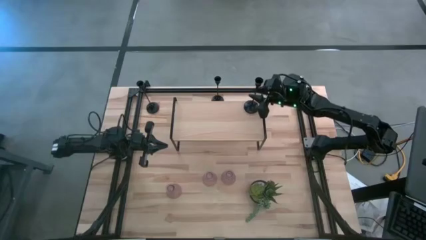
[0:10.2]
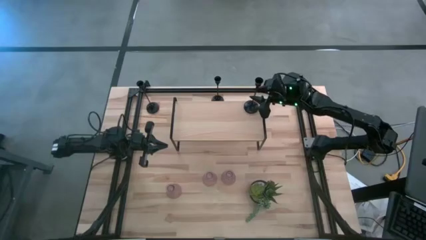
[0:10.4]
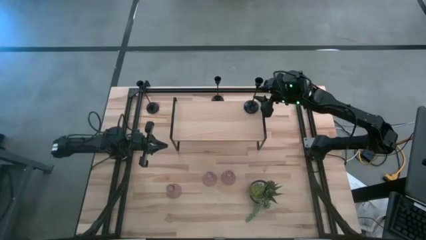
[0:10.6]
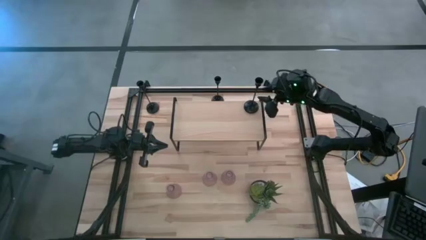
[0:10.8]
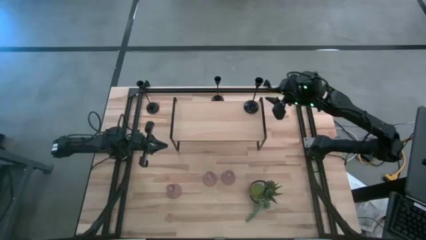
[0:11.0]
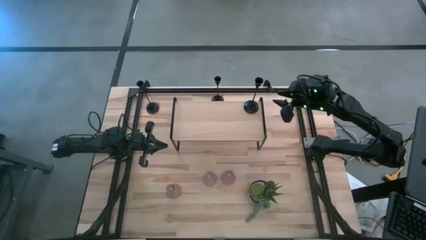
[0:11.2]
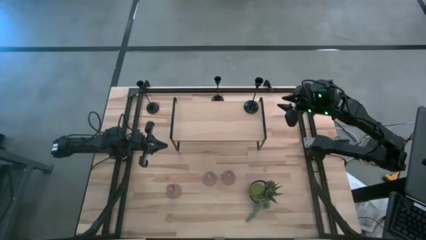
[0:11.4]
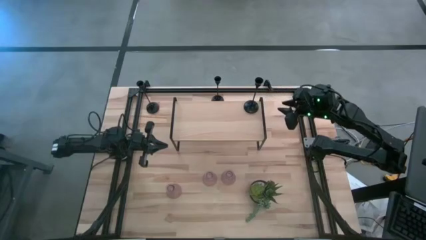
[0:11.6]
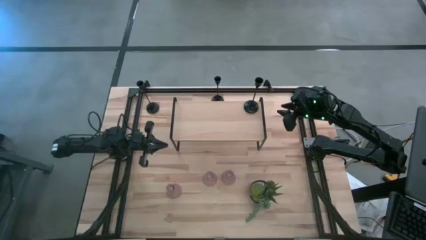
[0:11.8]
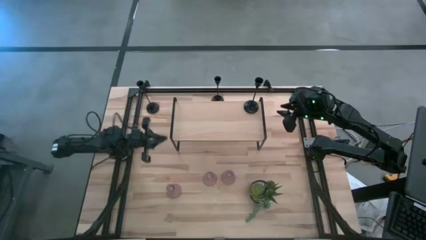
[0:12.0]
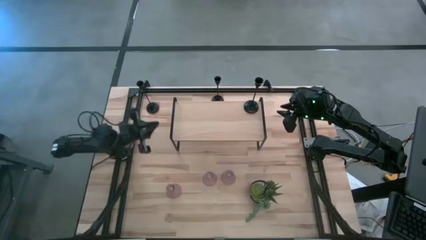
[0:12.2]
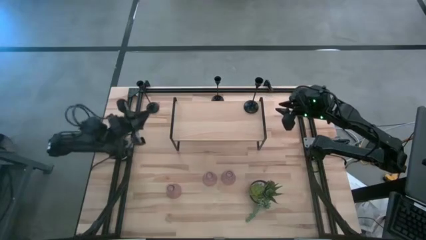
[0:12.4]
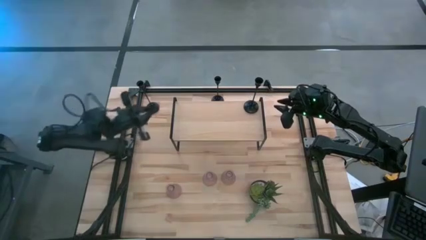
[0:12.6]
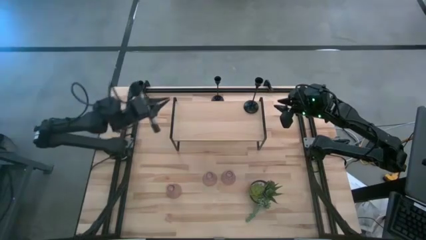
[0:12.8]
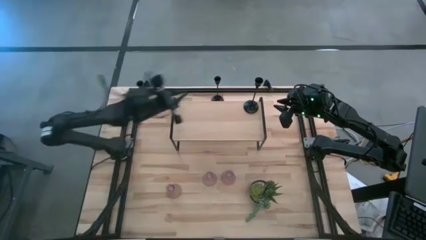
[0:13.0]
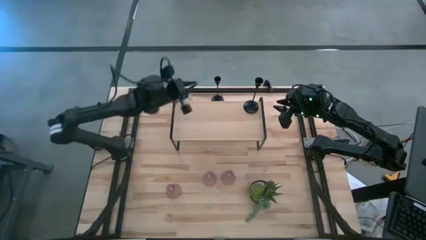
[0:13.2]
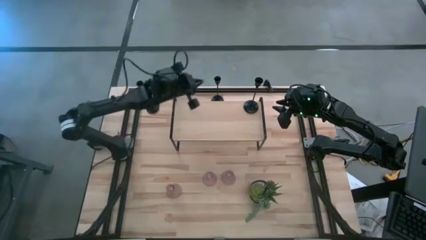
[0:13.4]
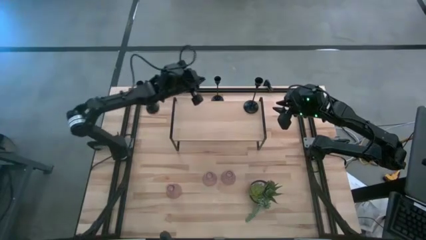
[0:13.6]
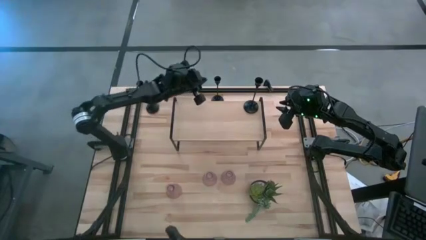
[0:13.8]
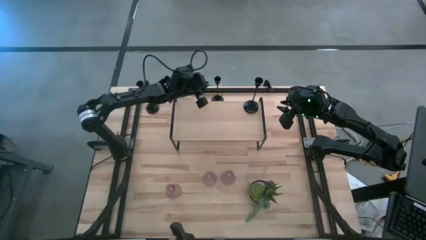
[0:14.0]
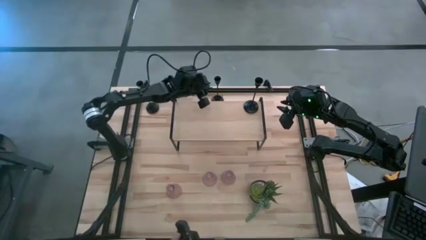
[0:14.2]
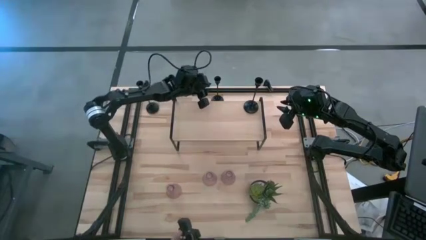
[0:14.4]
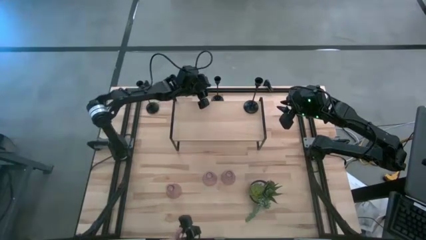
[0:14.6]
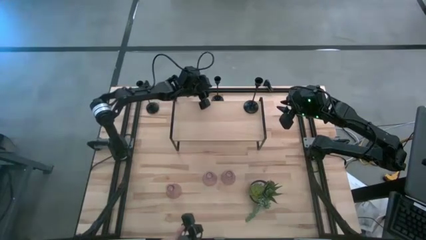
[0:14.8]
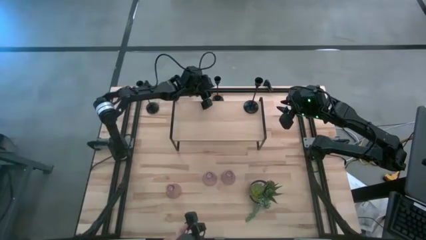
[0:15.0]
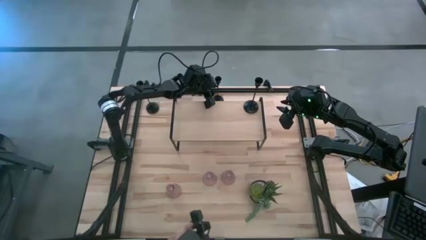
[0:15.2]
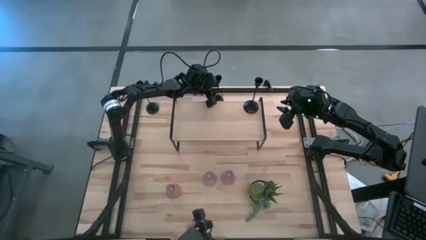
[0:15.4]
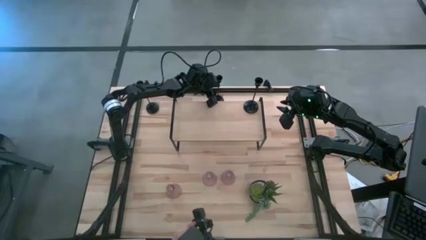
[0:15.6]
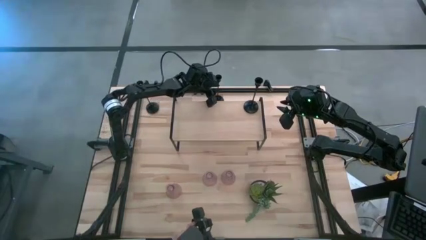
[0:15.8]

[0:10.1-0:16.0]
Task: Pick & Place candle stick holders
Put the right black candle holder on the shelf

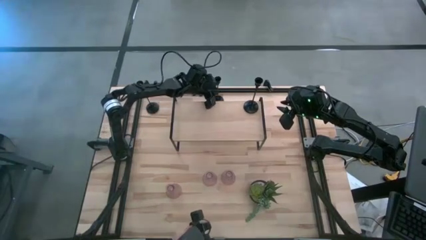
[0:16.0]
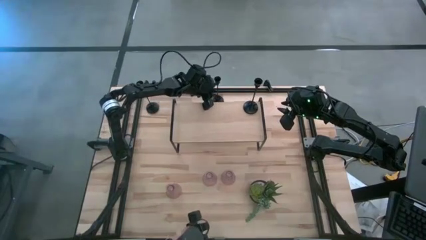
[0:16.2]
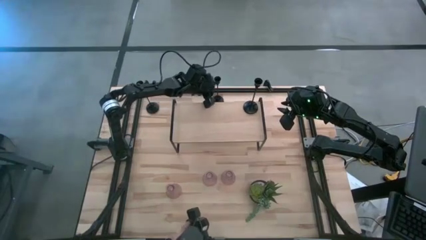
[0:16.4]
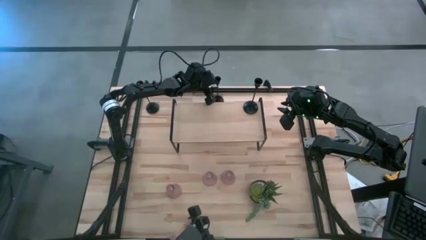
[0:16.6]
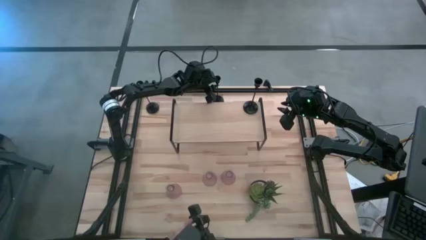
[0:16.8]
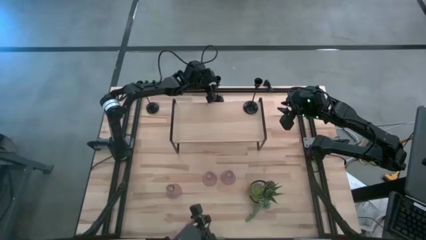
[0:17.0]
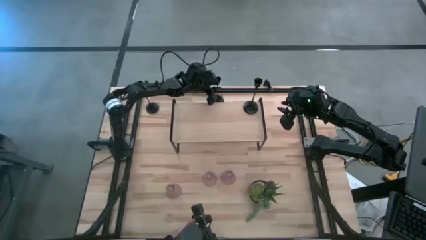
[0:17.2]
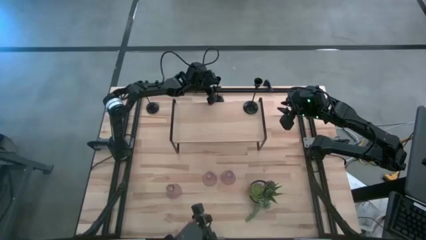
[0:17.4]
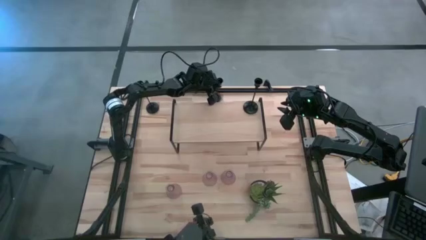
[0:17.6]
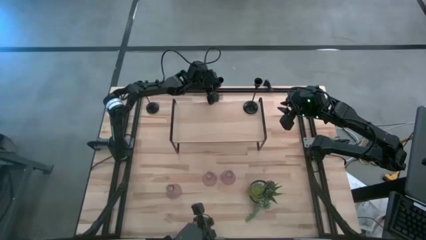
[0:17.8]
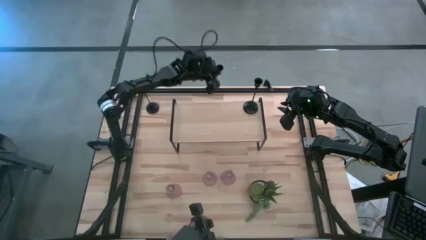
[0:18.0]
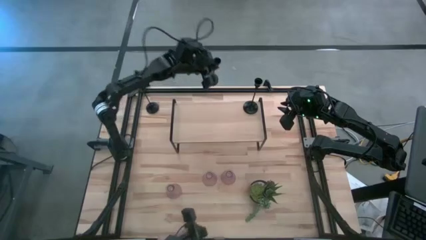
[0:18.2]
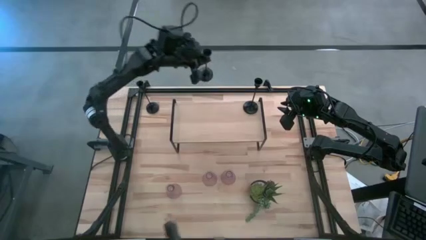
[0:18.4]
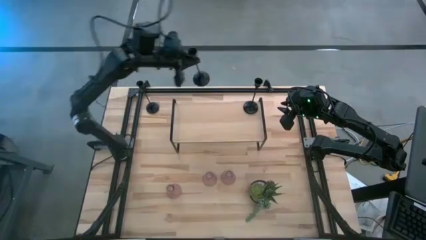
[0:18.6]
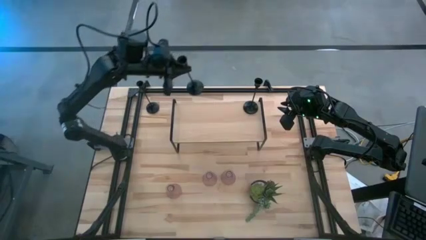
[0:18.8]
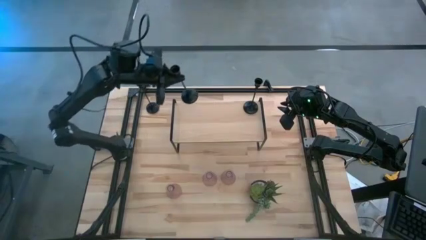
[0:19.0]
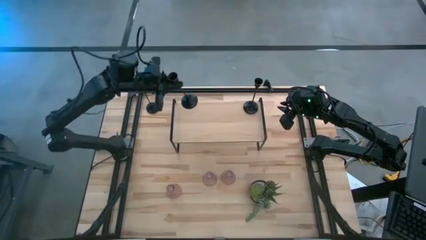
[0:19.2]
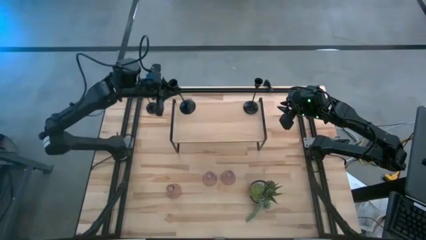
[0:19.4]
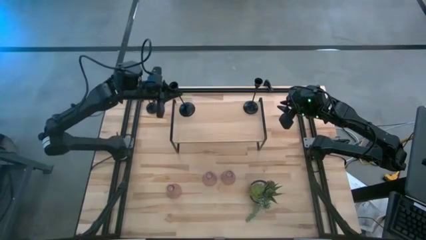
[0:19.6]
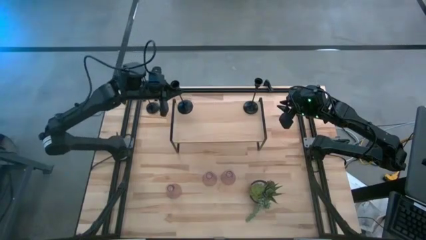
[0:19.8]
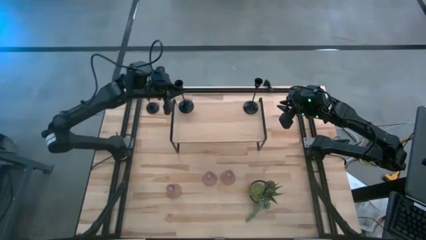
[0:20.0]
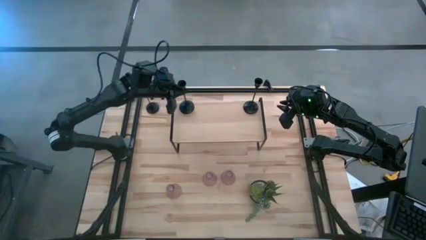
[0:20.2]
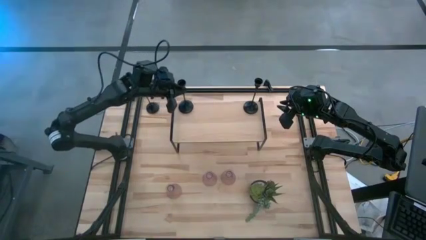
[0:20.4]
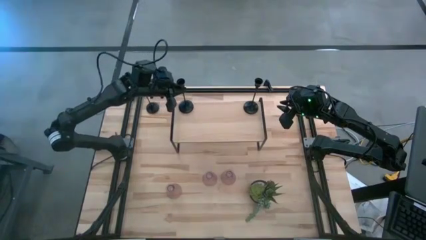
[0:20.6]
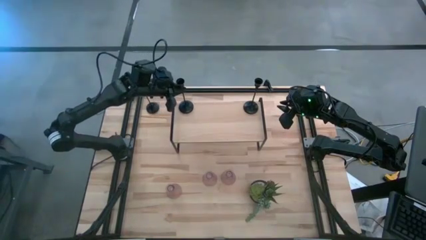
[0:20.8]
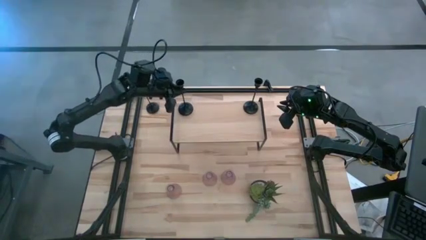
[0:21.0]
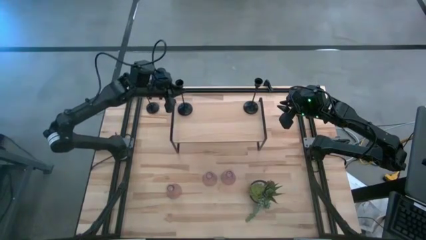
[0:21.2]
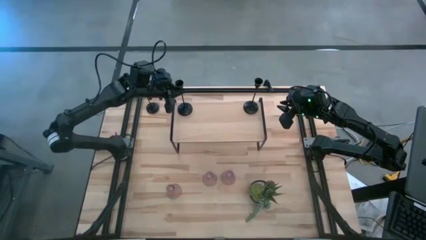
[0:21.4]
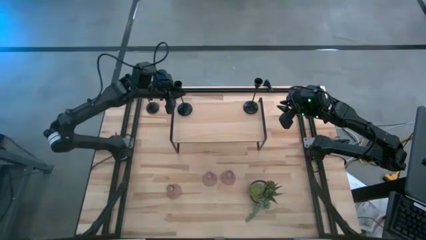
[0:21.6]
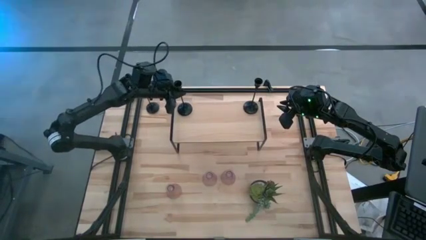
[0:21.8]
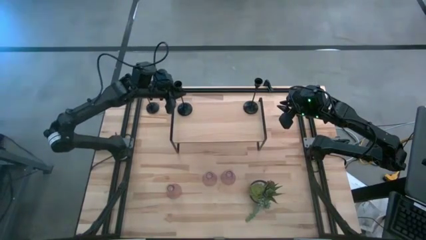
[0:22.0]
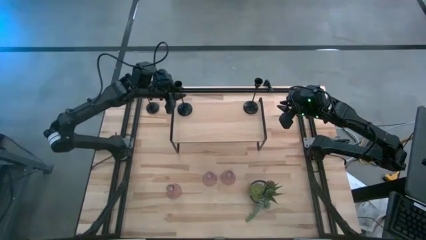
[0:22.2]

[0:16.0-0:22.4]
Put the right black candle holder on the shelf

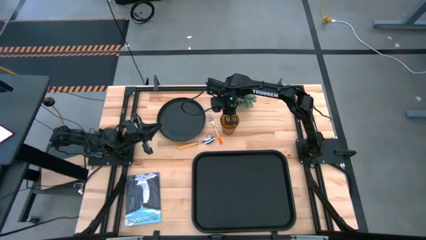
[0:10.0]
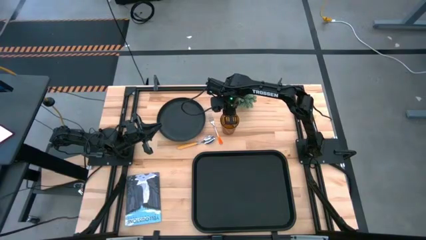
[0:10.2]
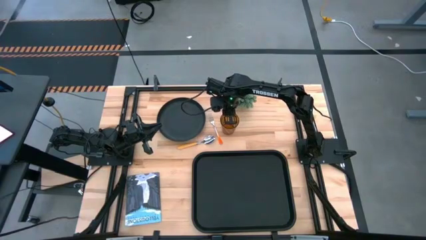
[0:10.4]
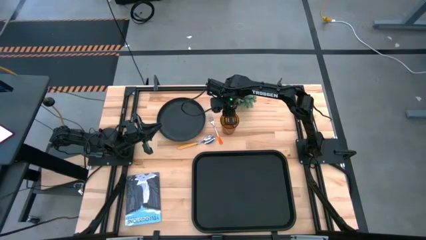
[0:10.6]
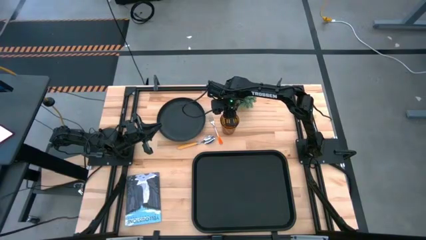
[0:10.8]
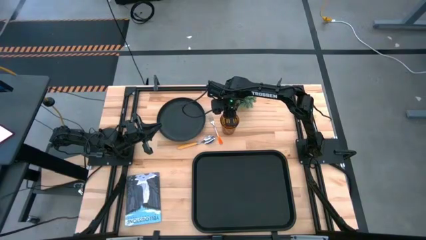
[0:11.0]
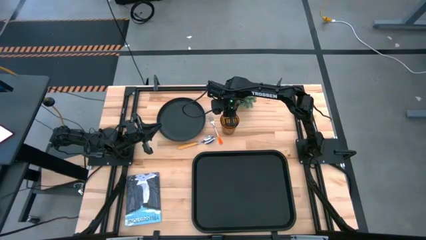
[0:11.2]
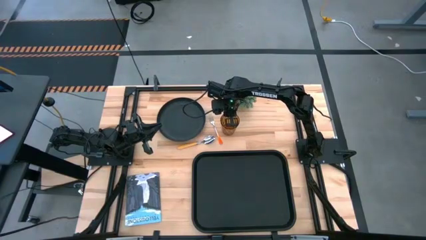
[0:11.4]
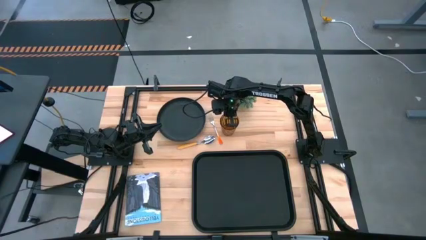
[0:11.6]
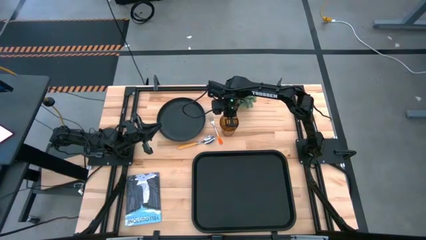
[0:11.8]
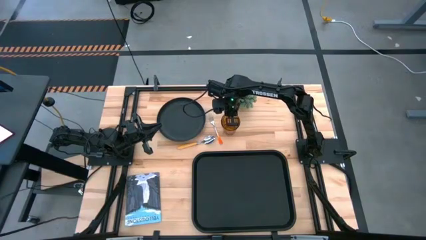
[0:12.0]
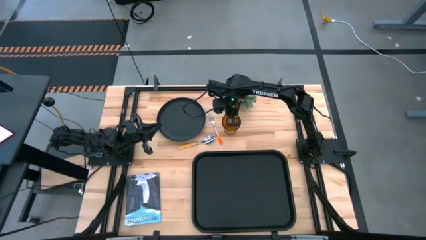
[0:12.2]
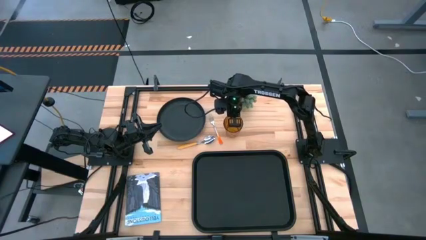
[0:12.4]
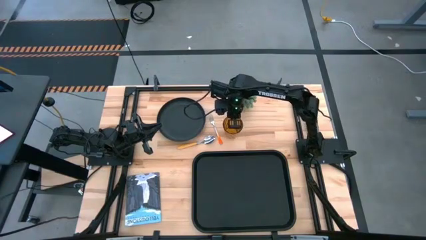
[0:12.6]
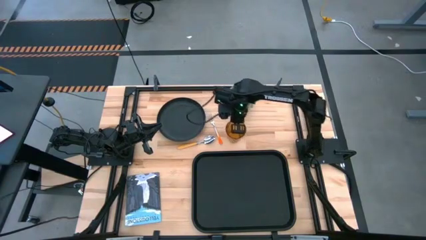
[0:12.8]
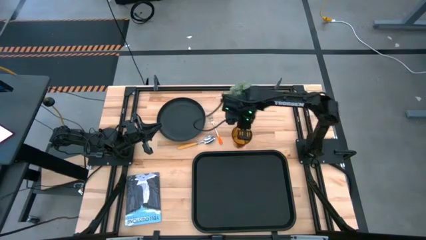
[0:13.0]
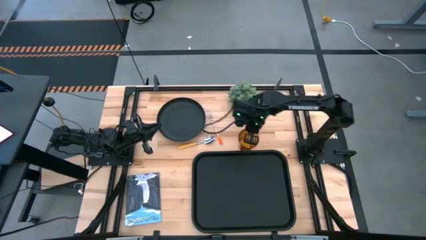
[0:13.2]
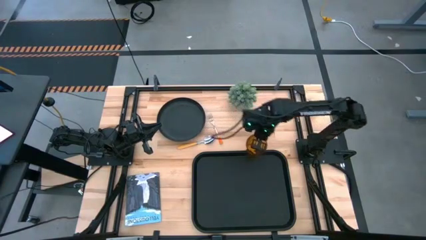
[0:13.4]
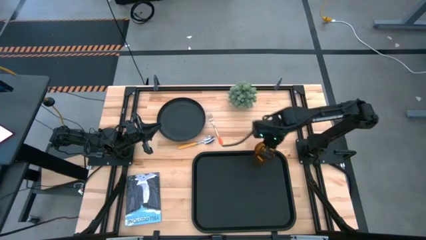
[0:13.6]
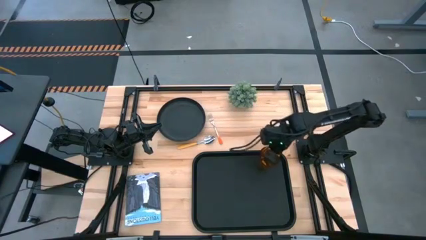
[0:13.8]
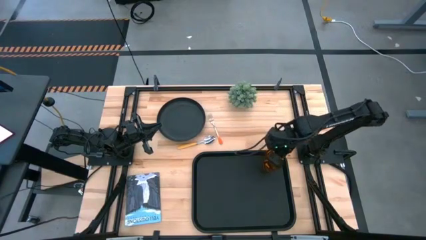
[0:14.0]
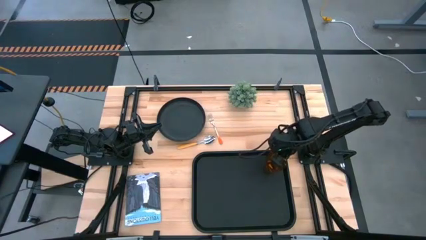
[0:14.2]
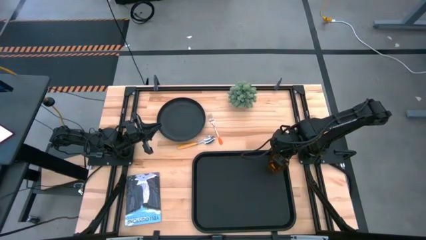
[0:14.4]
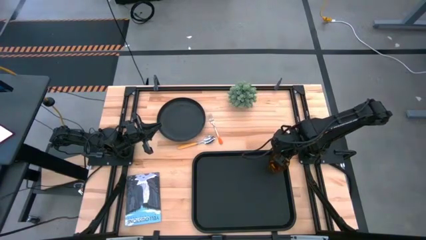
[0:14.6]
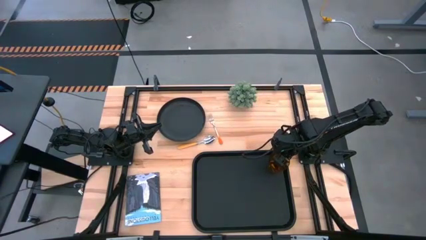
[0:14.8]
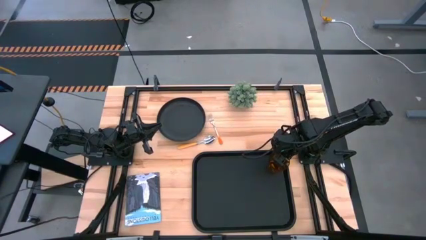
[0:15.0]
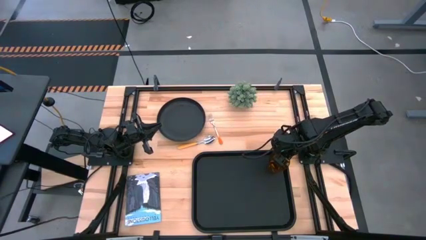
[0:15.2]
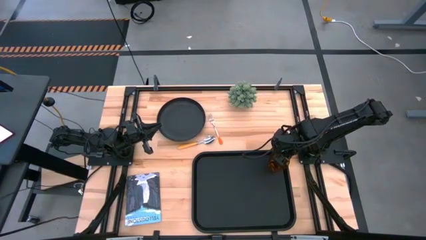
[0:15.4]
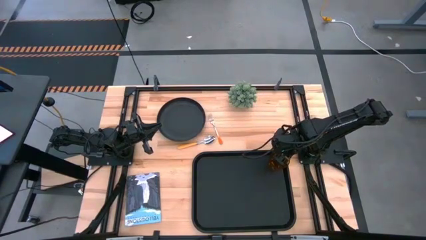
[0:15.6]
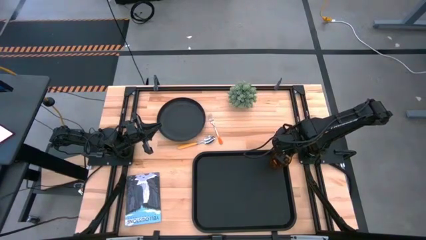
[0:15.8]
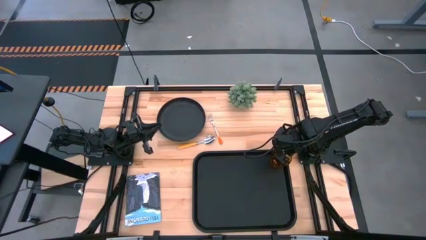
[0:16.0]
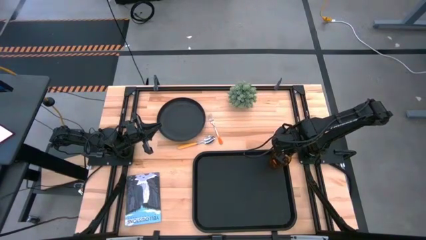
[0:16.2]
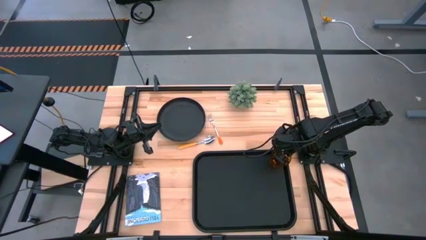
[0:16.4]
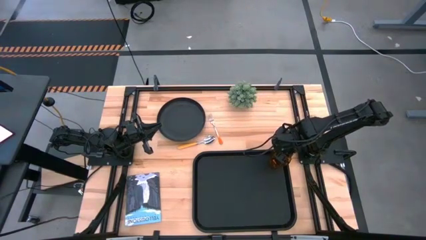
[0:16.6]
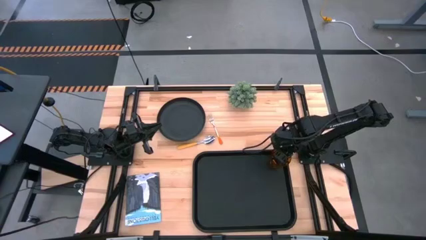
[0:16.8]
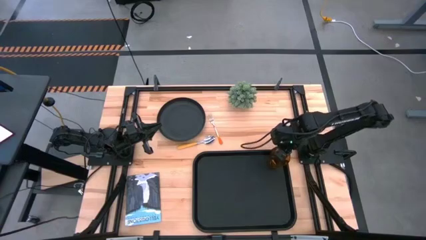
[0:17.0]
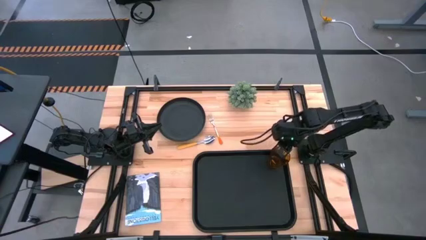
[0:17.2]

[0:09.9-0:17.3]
Task: Pick and place plate/cup/fork/spoon on tray
Put the orange glass on the top right of the black tray
